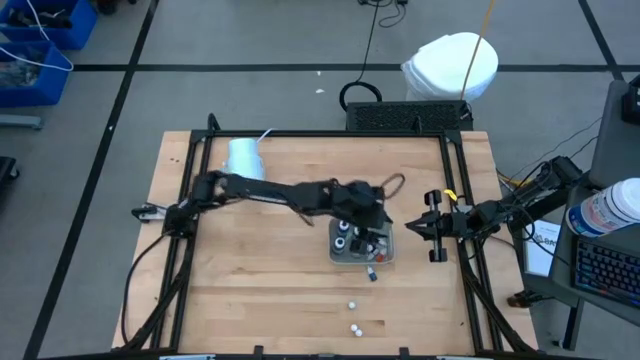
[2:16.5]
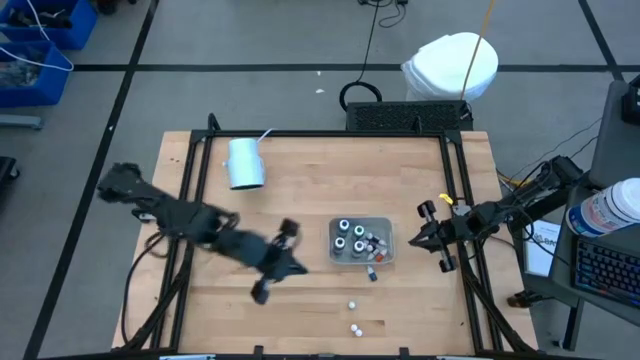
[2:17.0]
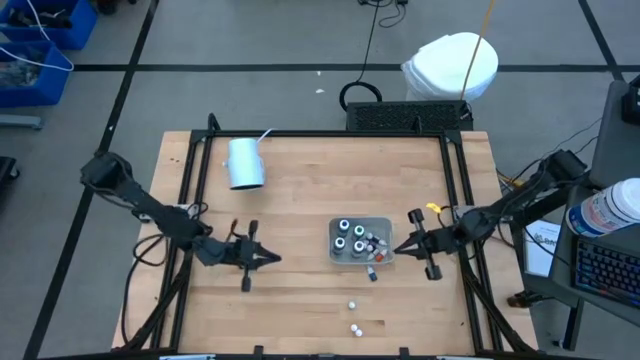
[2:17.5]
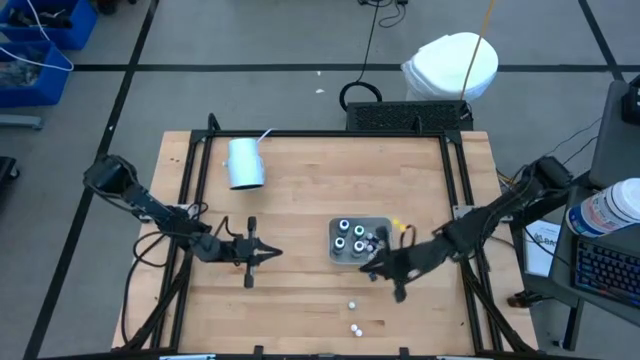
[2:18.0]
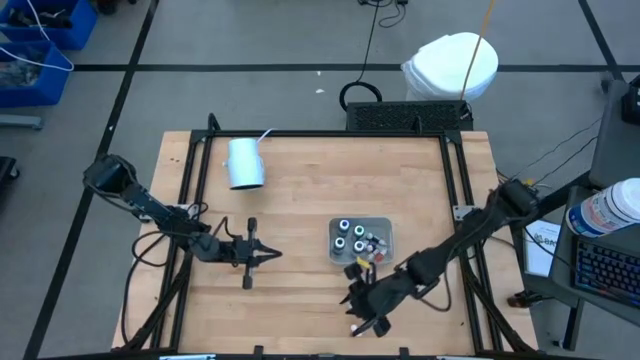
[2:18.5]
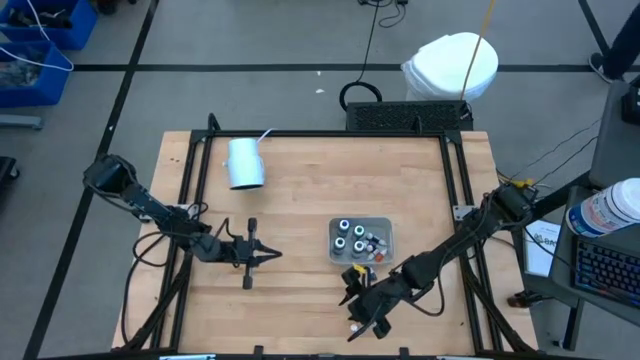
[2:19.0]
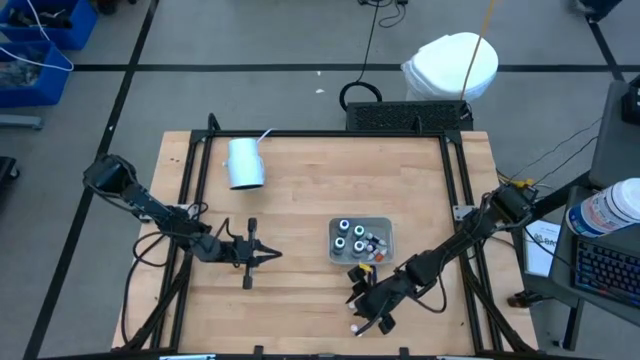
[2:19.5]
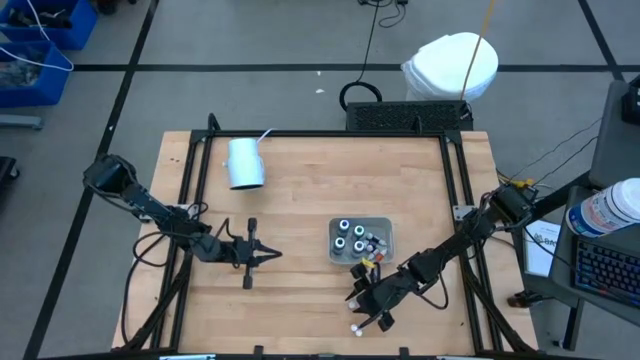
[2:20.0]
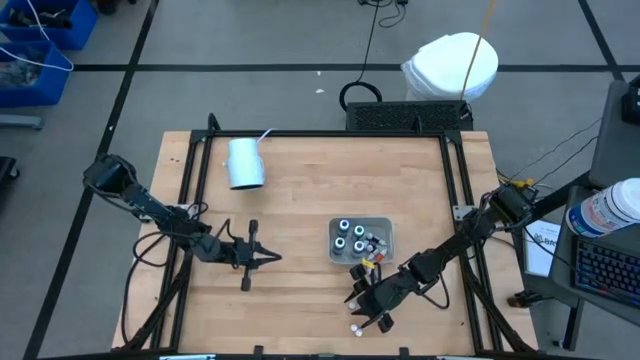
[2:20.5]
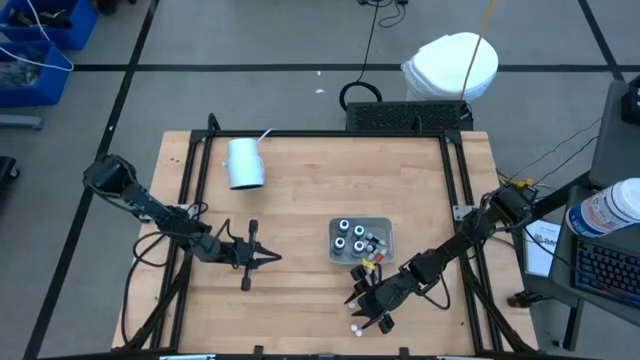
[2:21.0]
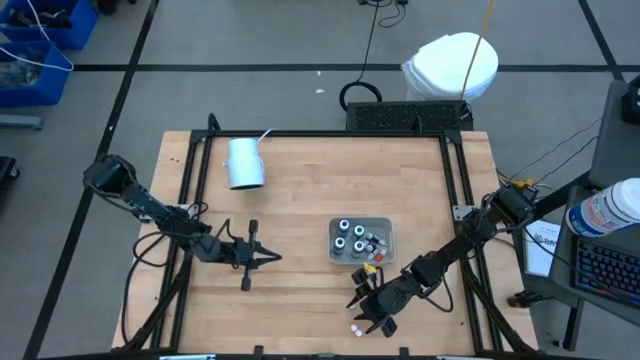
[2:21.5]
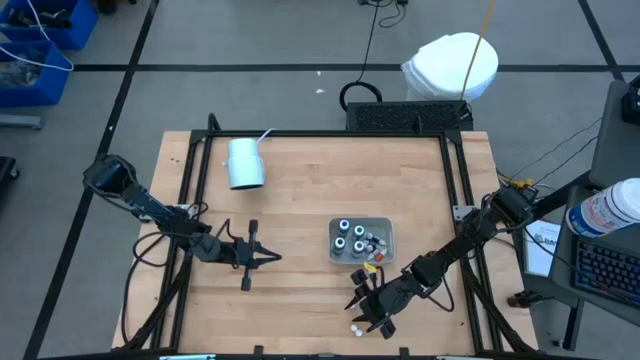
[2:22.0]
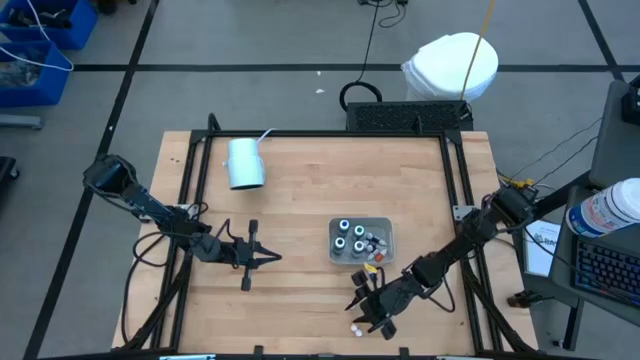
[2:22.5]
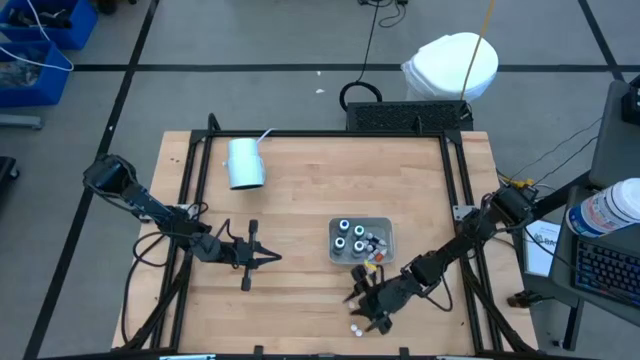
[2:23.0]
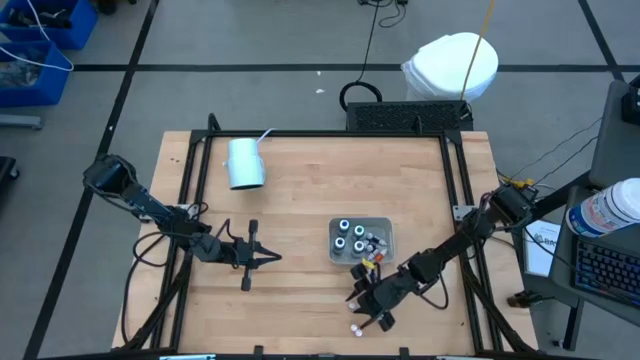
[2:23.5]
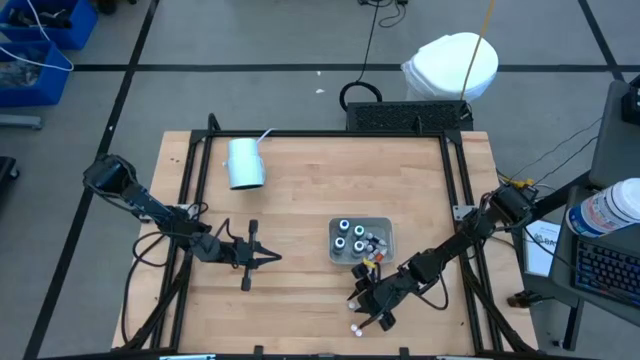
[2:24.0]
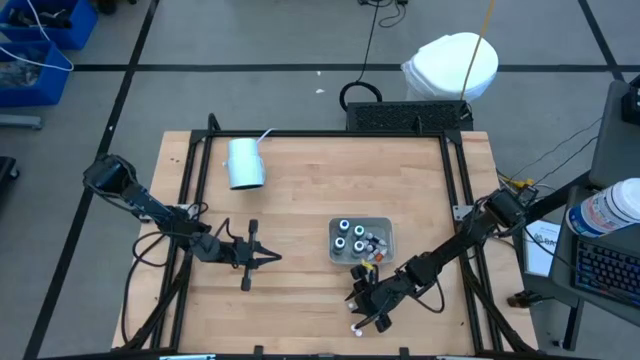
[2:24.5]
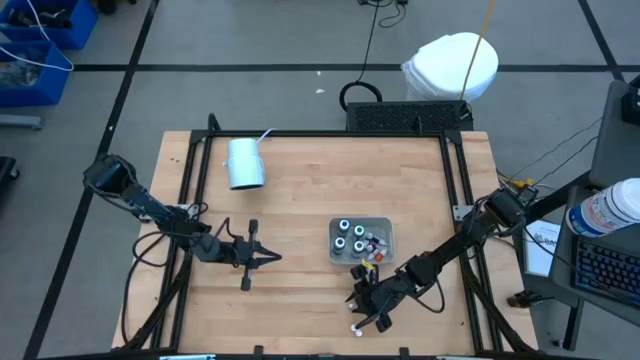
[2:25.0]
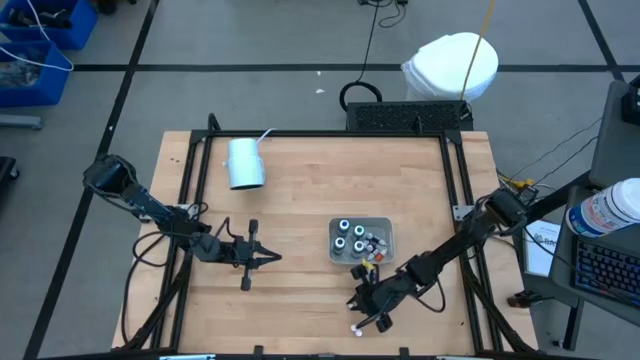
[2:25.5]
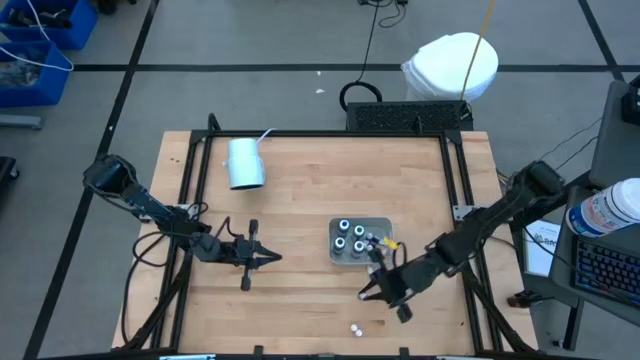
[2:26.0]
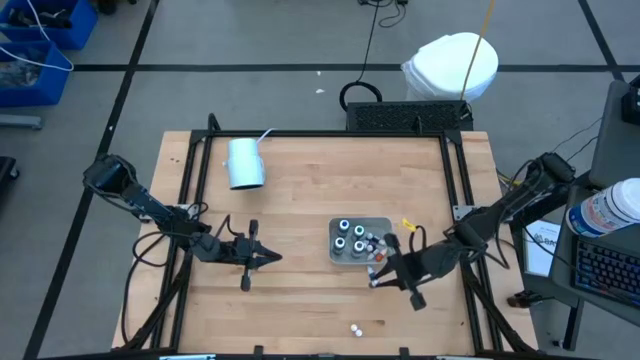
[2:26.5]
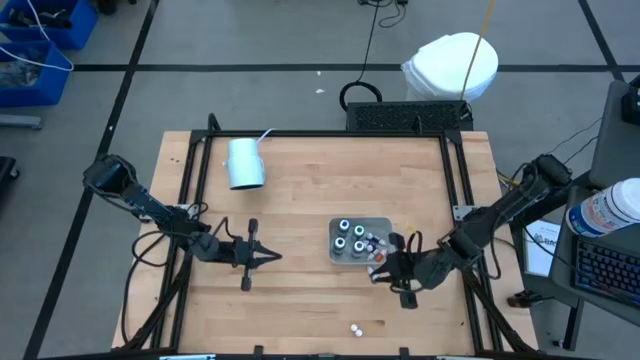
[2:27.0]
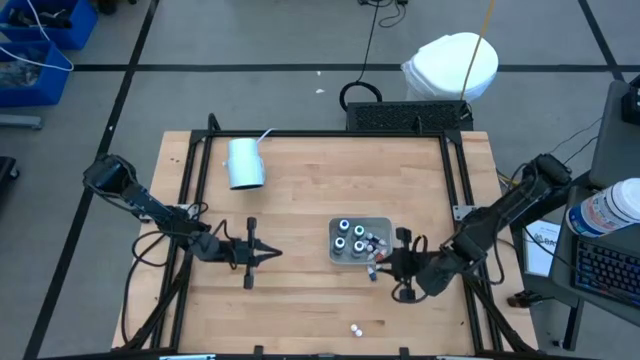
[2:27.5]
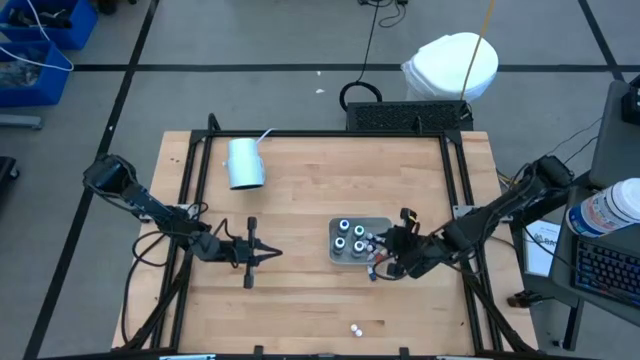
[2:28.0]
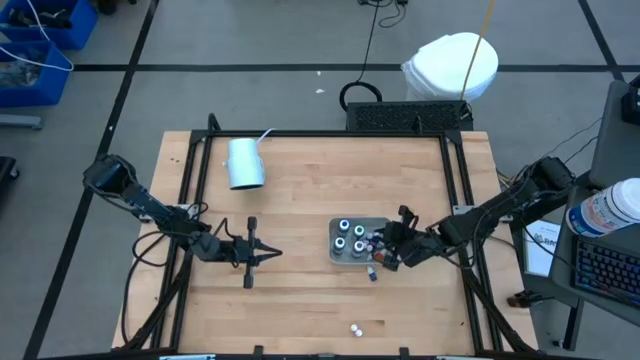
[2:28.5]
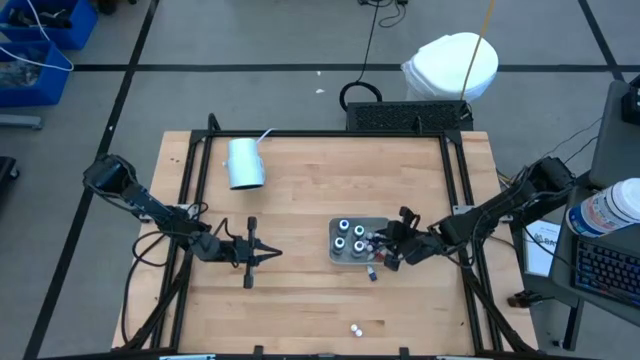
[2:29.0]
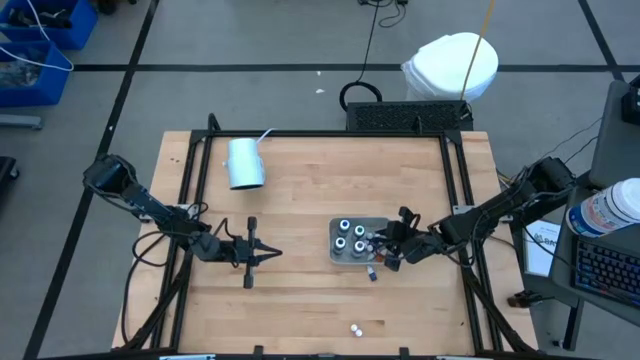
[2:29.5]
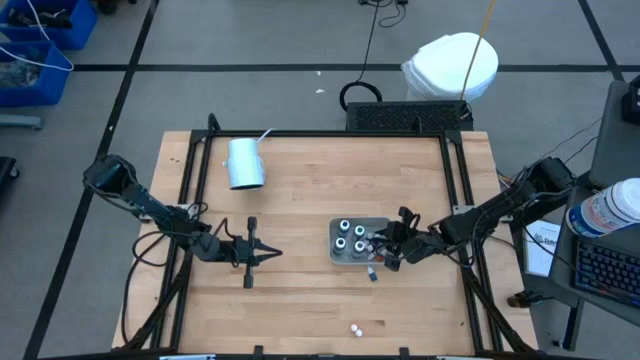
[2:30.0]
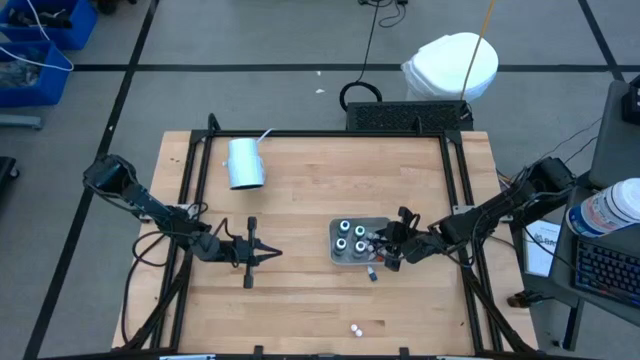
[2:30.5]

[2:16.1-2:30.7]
Task: Pick & Place food coloring
Put the small green food coloring bottle into the gray bin

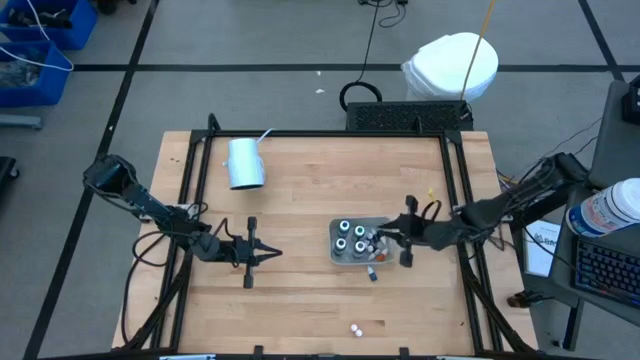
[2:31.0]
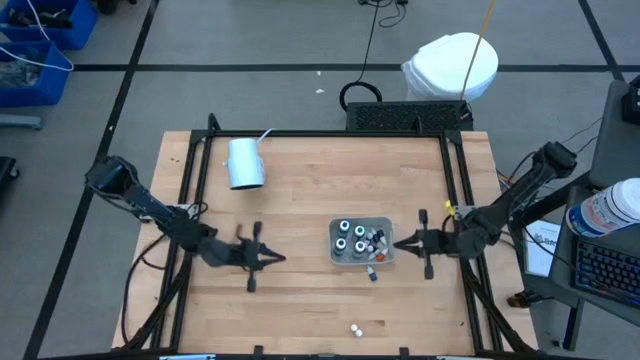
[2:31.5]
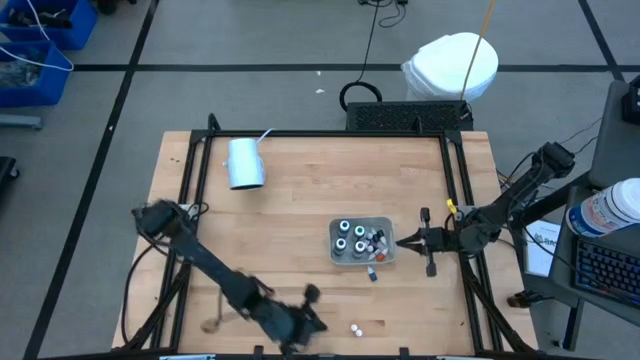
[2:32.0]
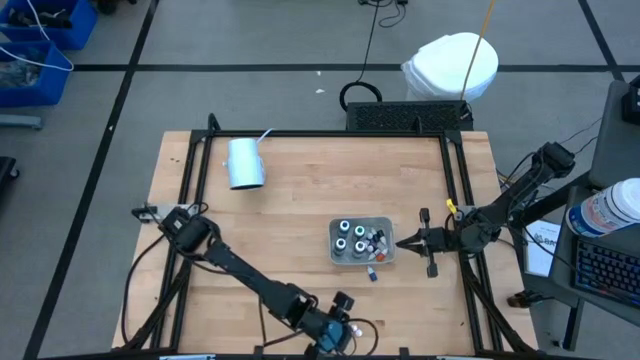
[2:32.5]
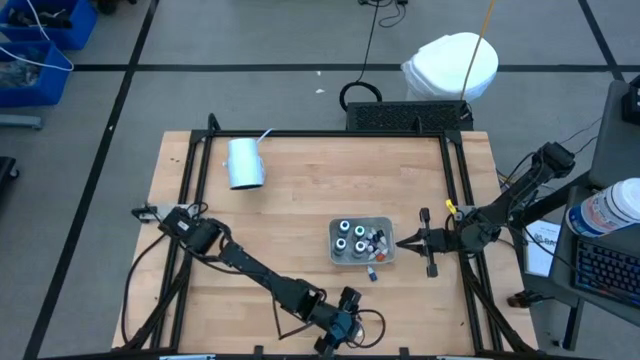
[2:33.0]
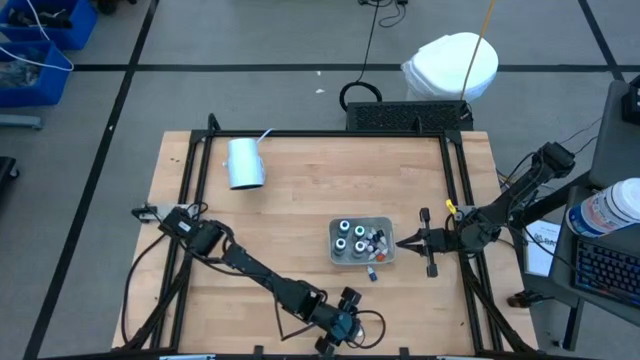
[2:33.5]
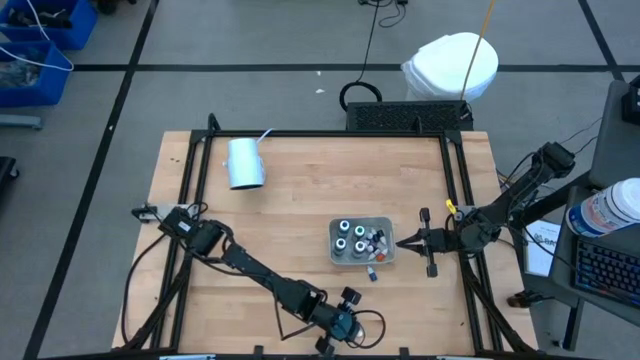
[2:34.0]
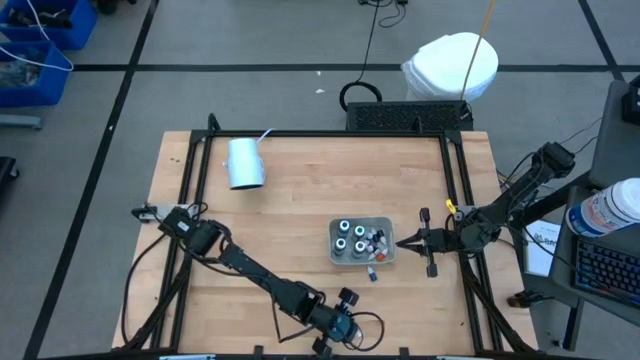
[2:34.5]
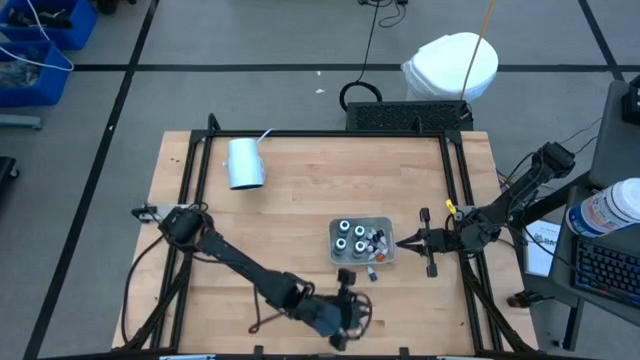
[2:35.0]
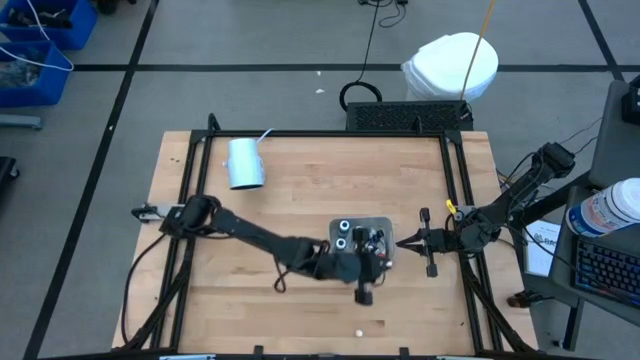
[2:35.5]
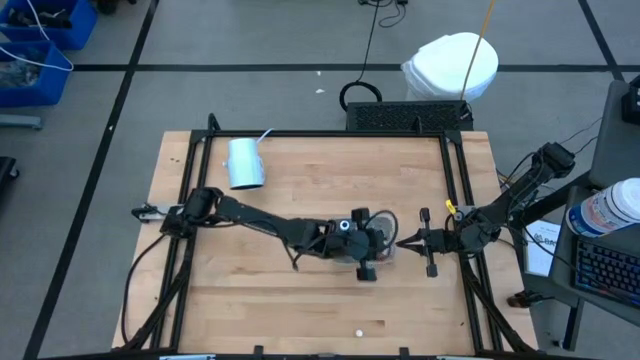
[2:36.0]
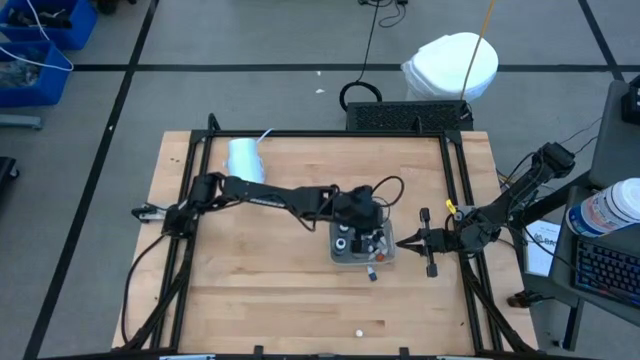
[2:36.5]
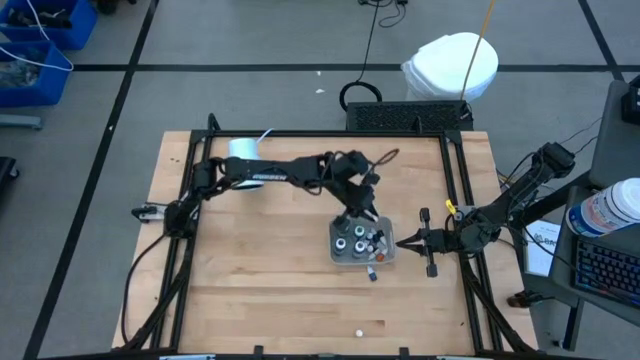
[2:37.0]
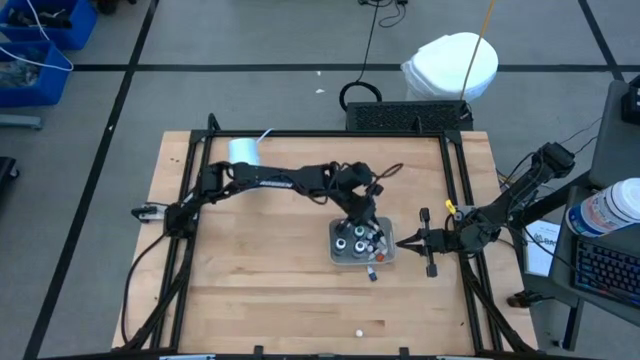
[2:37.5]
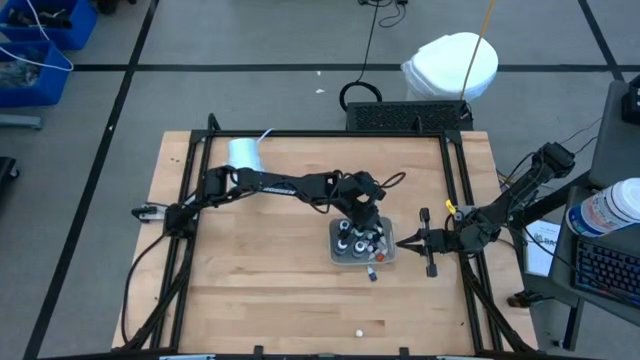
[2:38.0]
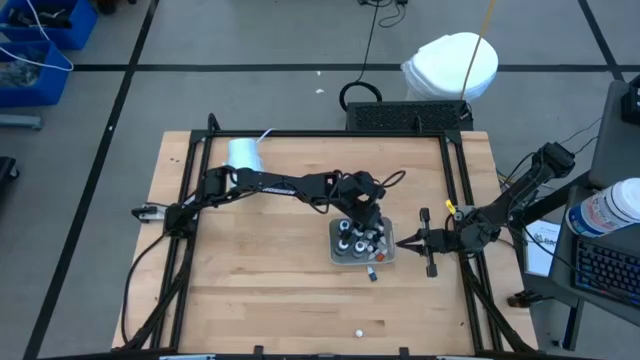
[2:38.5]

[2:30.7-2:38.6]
Put the orange food coloring bottle into the gray bin
